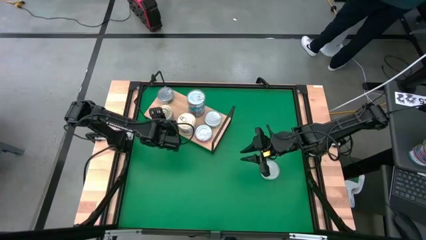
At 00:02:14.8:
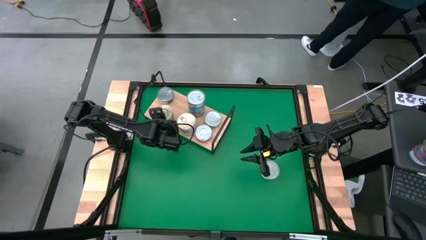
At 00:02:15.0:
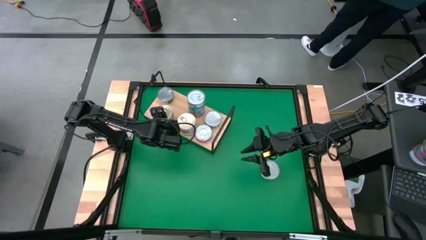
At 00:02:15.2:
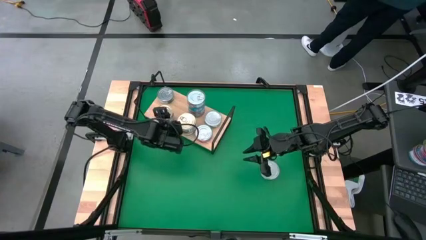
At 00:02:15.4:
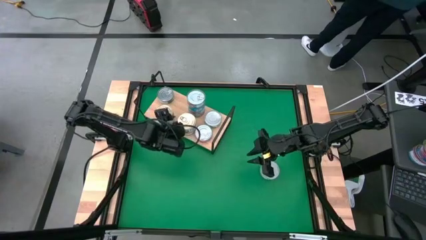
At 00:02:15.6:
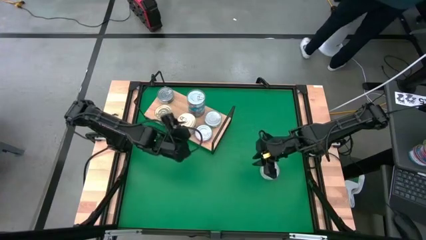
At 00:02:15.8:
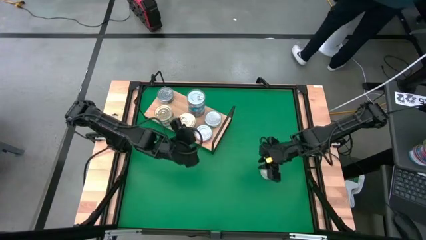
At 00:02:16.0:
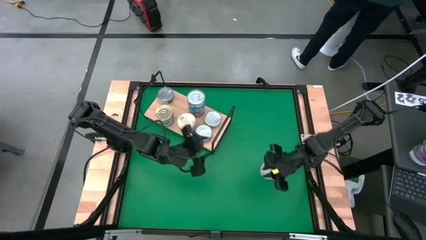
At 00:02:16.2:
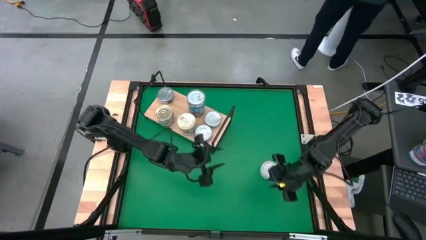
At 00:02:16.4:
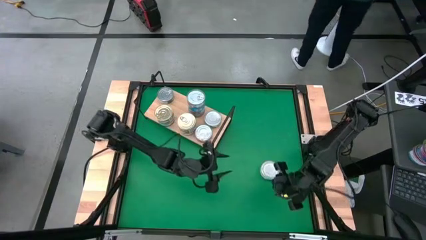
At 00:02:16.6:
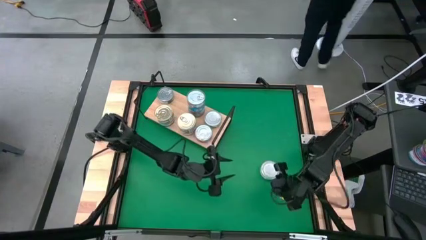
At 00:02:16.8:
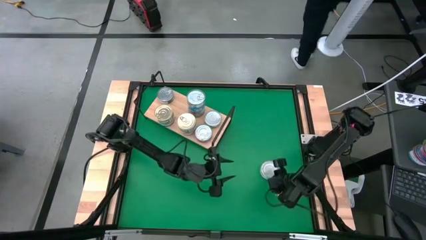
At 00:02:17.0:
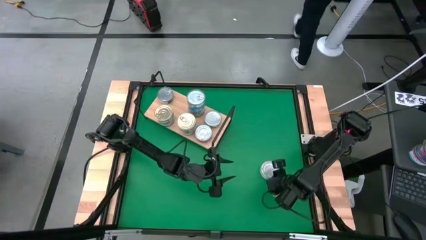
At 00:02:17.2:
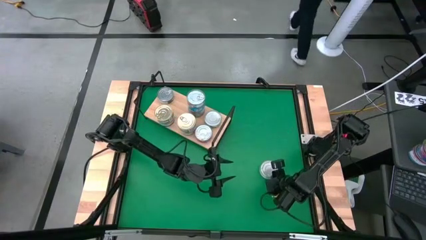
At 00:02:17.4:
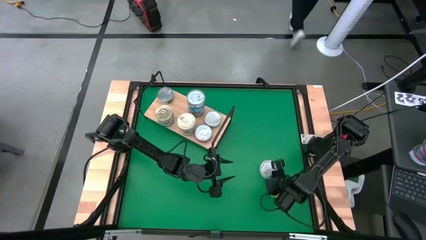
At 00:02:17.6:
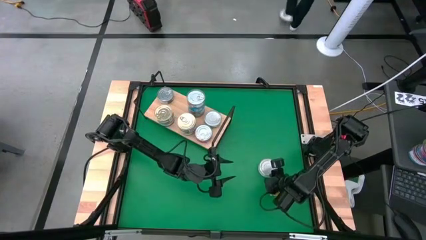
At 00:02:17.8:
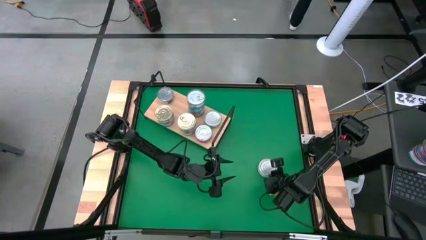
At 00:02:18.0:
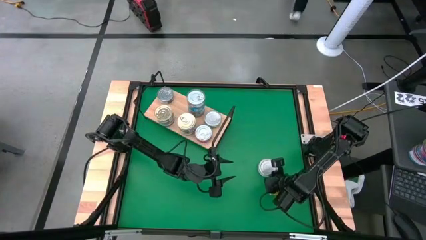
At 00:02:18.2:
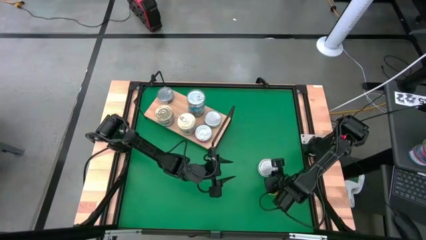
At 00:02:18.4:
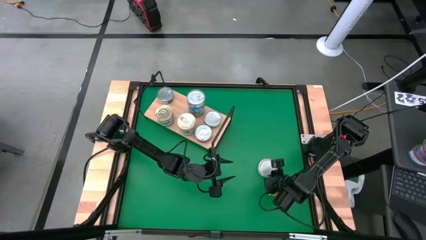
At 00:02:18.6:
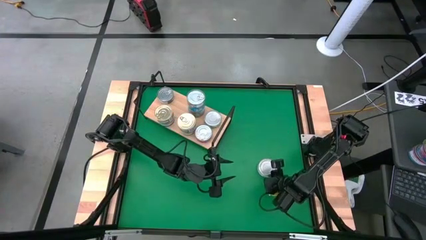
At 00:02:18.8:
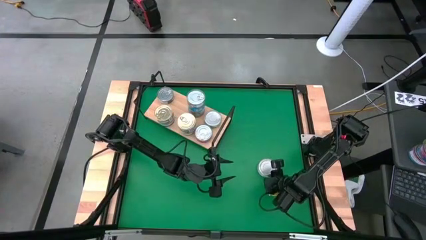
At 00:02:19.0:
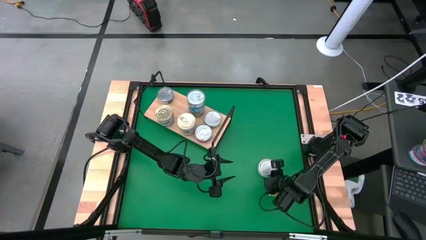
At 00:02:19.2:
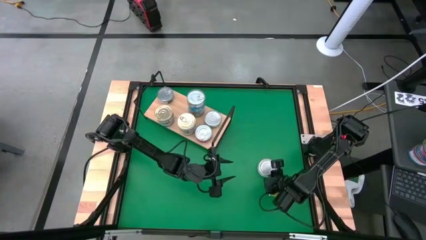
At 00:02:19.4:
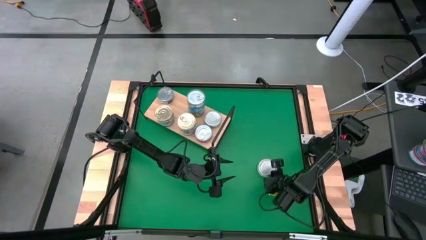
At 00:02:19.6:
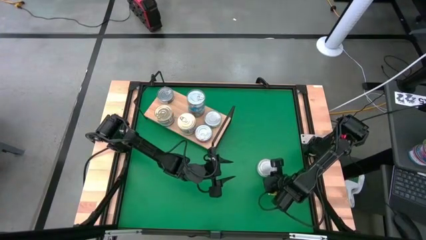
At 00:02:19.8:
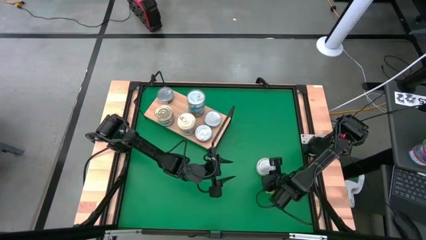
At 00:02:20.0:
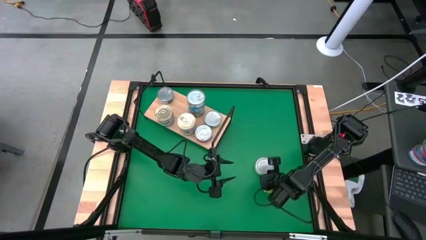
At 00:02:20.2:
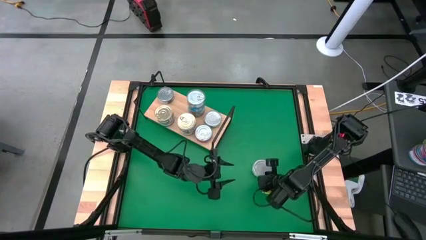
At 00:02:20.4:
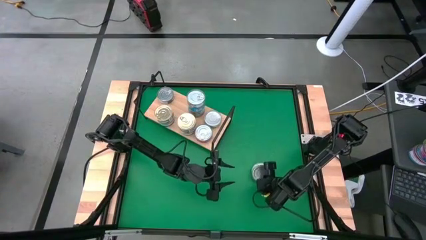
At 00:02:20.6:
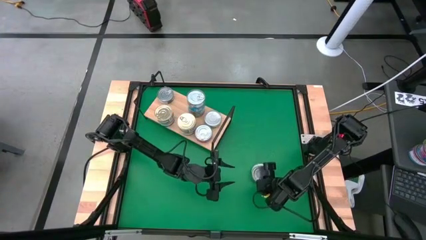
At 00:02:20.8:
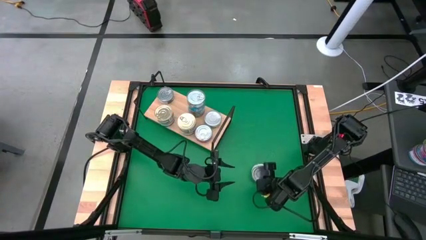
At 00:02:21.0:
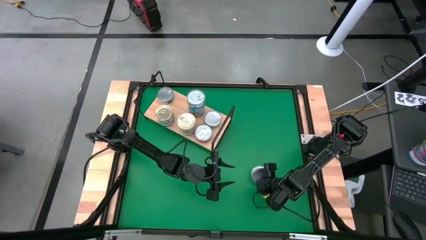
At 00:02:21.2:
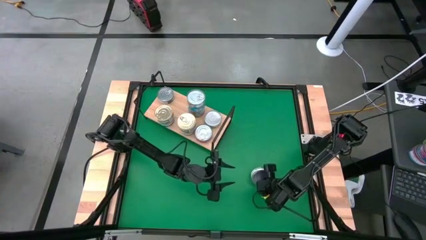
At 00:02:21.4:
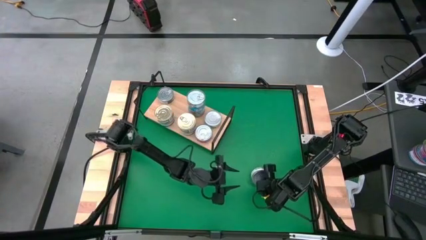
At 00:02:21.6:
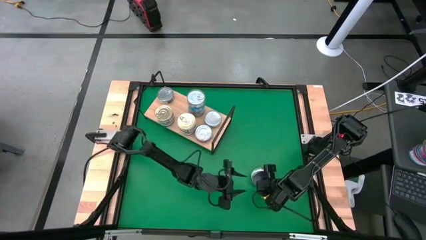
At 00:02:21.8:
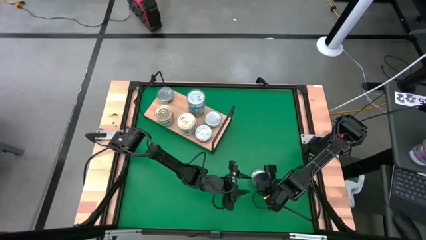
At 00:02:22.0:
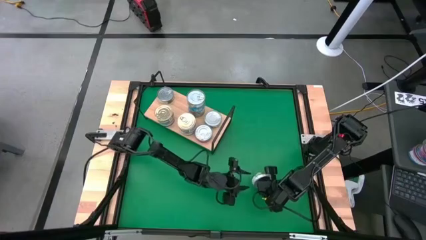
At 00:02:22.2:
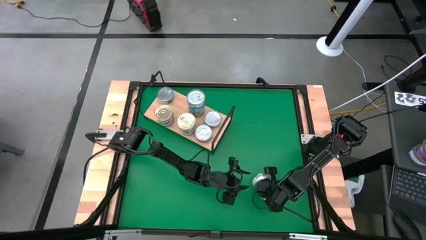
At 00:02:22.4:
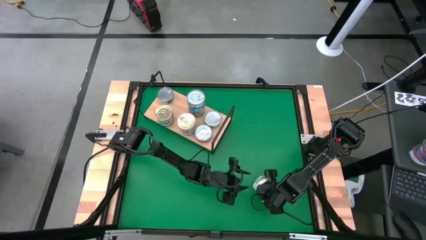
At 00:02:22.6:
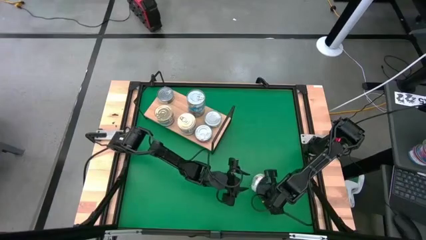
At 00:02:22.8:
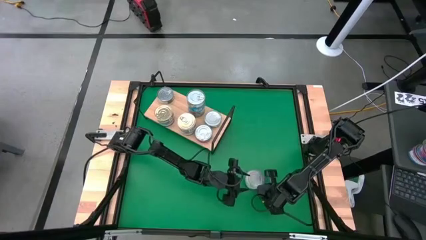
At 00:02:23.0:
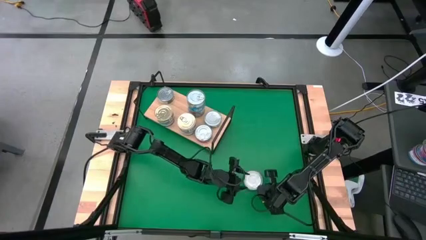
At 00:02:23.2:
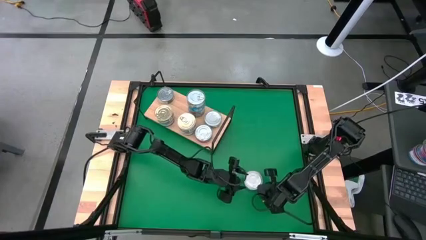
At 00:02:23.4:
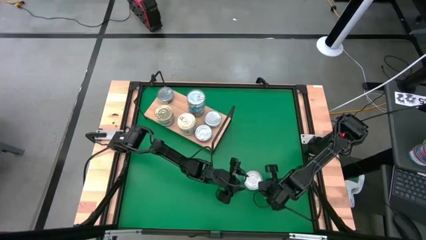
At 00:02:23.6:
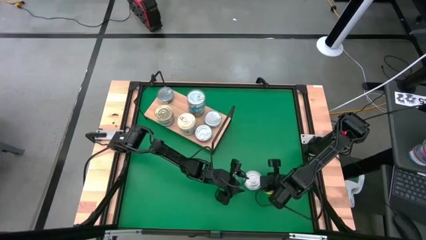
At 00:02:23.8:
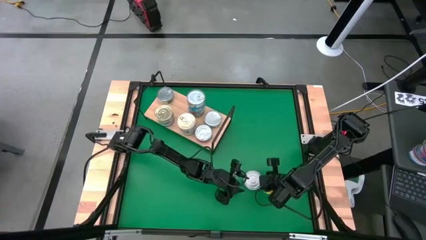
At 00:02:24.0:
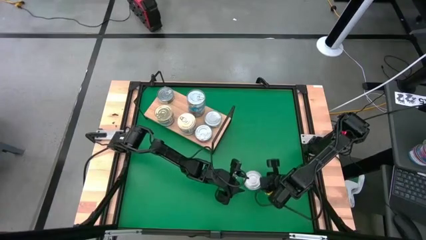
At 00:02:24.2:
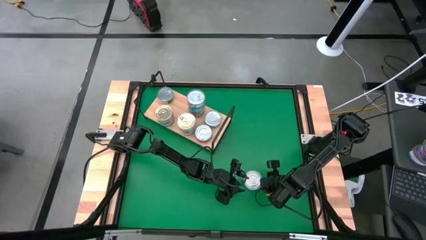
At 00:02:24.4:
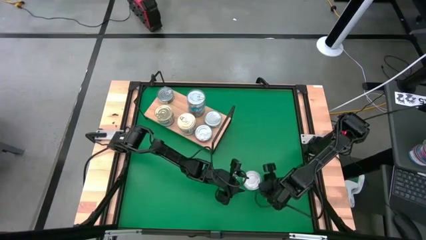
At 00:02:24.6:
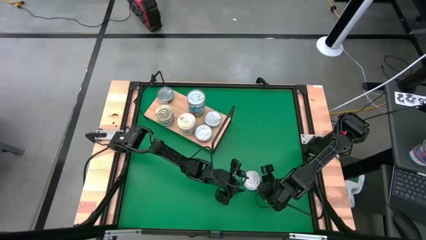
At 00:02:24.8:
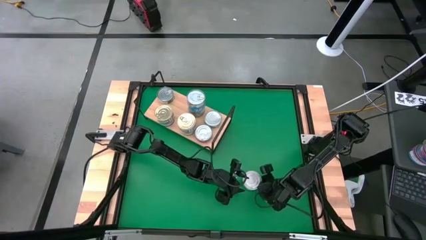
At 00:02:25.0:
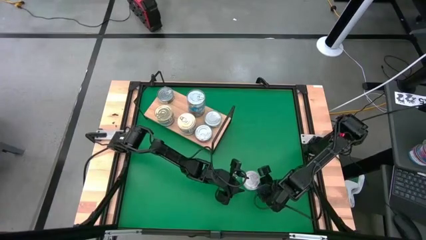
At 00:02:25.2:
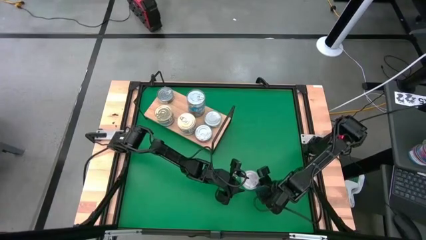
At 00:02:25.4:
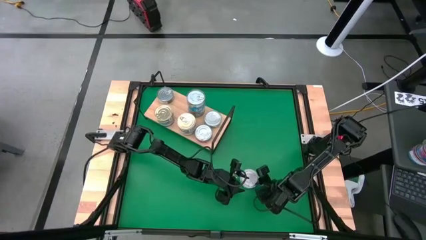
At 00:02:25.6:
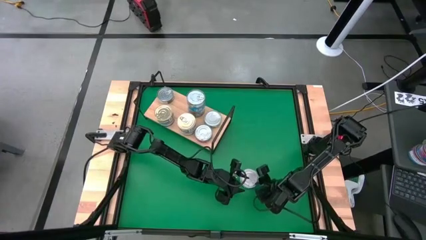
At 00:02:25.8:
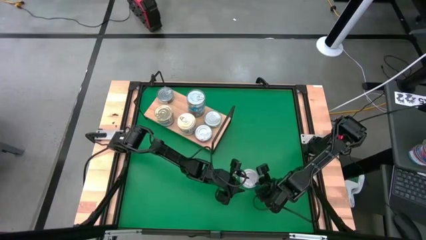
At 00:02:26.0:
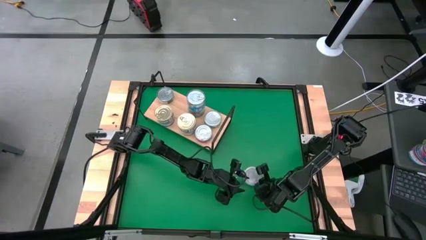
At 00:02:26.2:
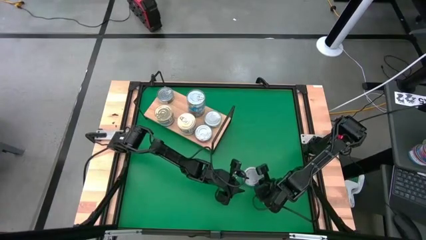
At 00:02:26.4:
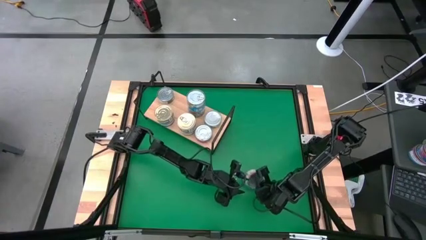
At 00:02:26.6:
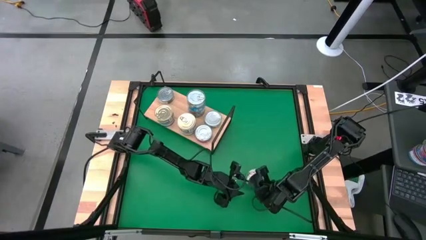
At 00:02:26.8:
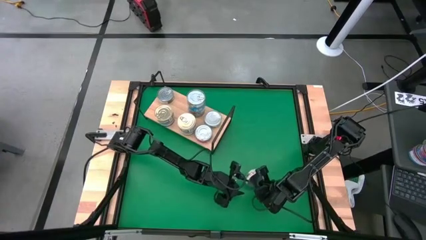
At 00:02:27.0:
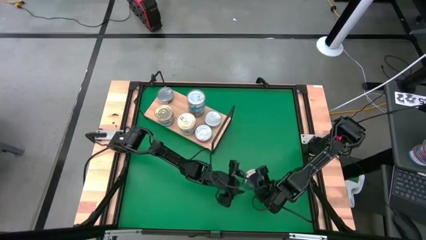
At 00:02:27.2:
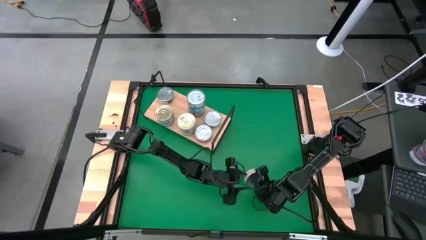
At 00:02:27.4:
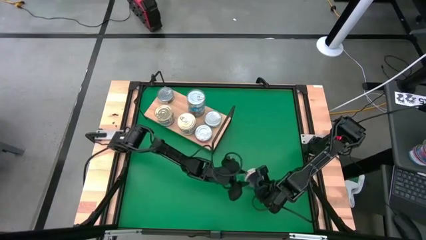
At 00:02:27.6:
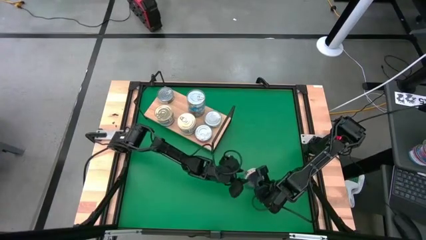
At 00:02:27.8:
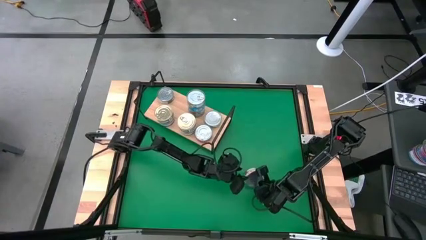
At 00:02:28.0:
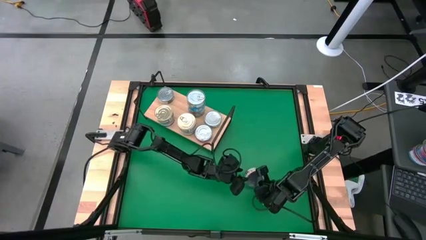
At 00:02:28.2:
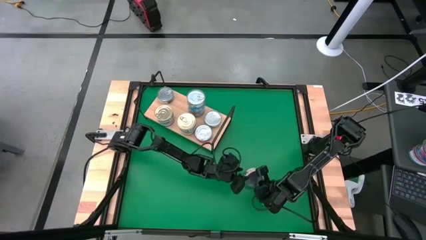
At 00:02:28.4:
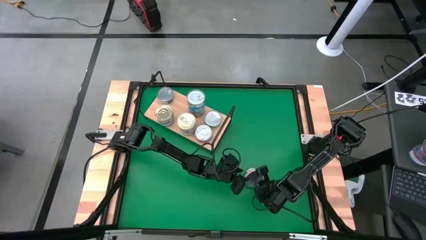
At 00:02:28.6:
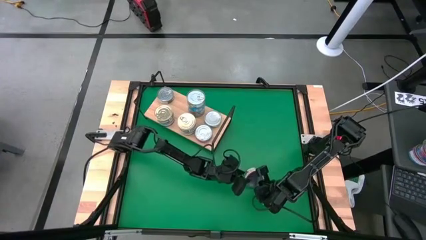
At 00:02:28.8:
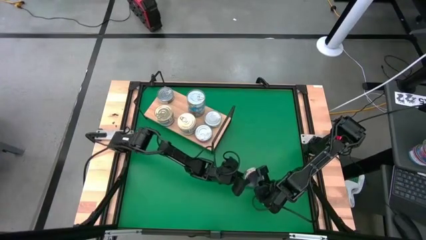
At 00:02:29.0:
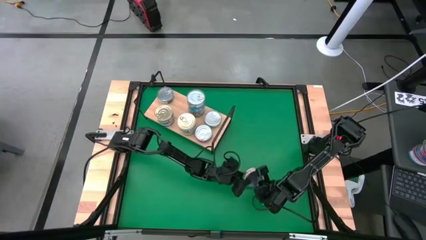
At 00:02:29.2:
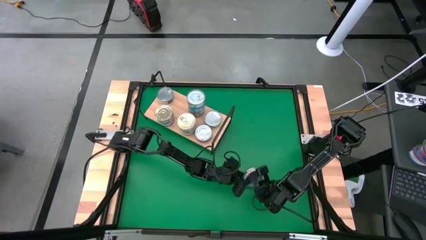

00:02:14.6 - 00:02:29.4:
Task: Stack canned seafood by type on shelf
Stack the green tuna can on top of the green tuna
